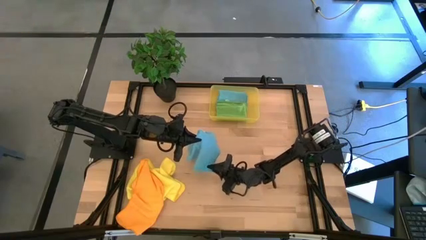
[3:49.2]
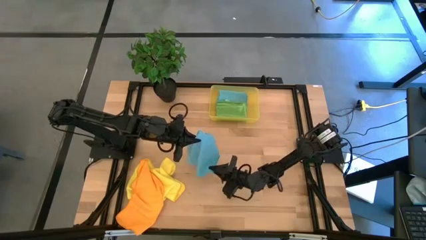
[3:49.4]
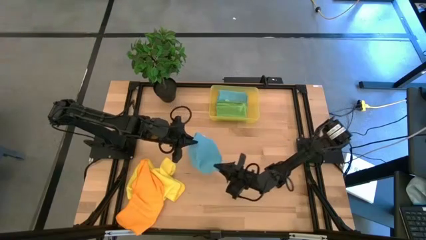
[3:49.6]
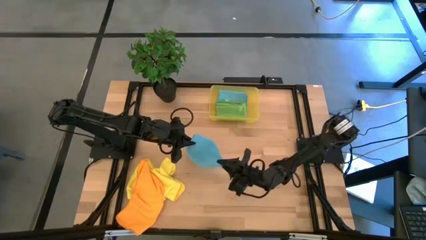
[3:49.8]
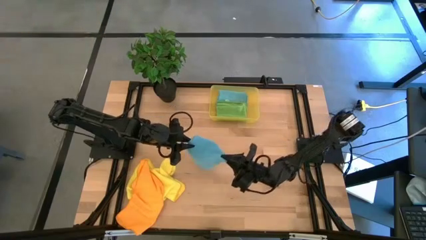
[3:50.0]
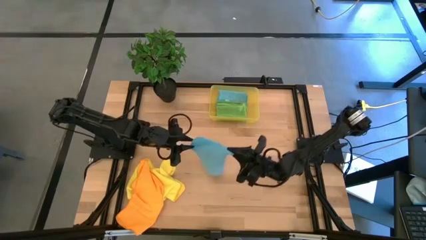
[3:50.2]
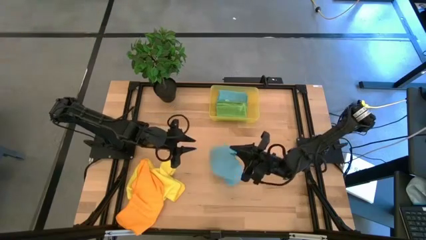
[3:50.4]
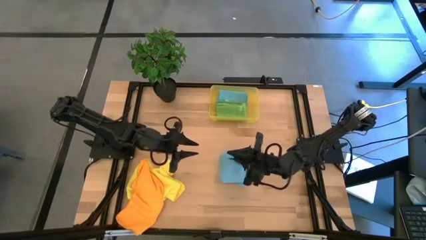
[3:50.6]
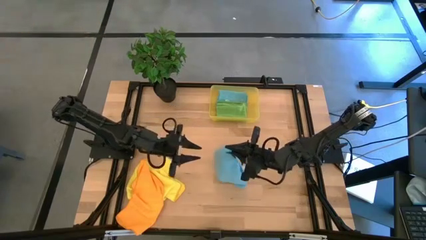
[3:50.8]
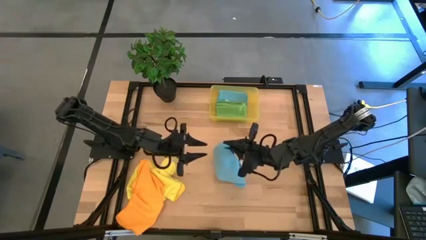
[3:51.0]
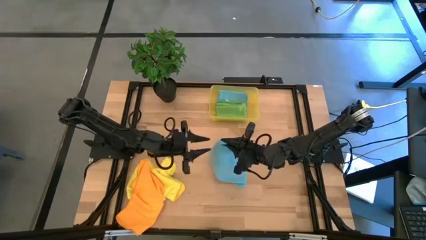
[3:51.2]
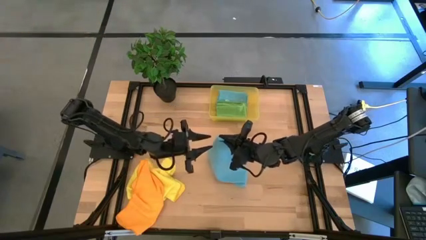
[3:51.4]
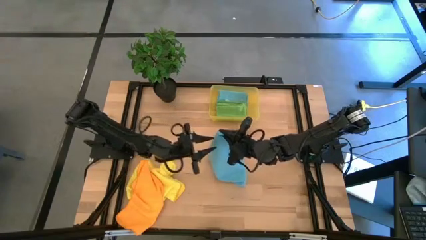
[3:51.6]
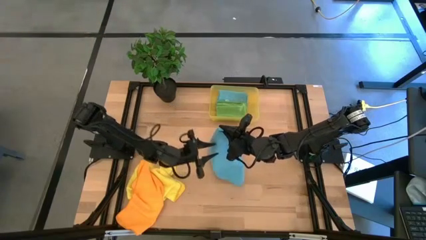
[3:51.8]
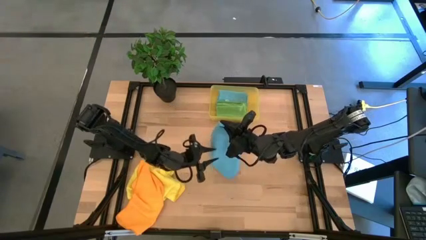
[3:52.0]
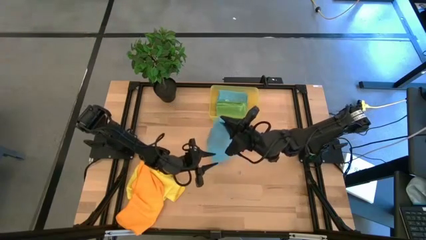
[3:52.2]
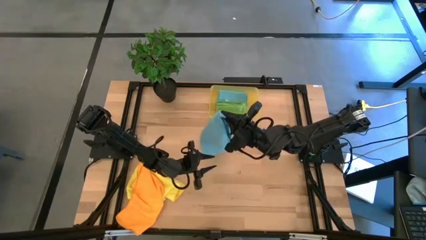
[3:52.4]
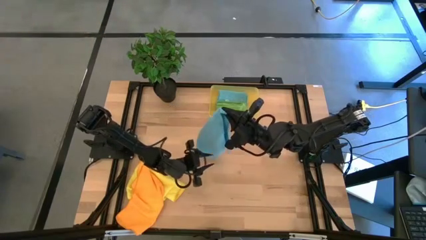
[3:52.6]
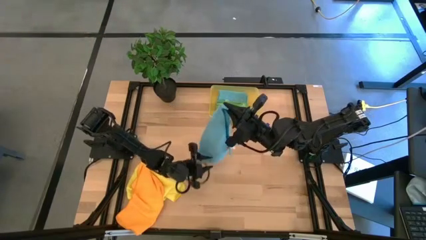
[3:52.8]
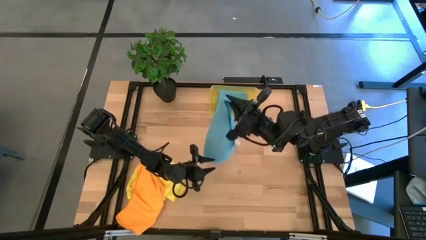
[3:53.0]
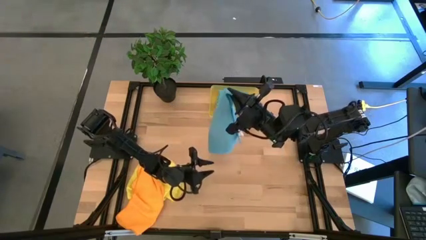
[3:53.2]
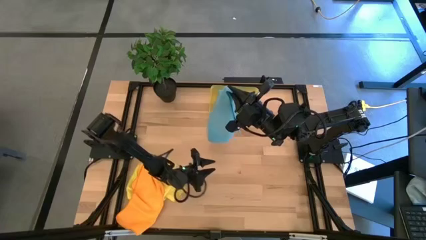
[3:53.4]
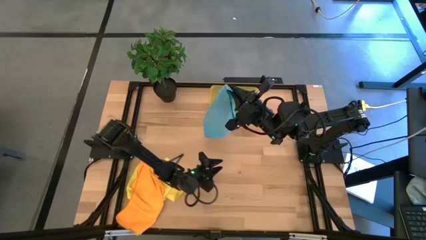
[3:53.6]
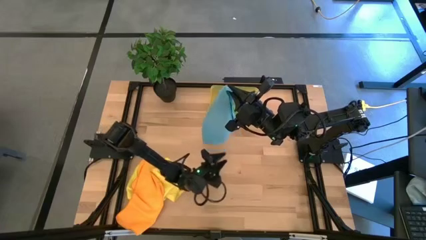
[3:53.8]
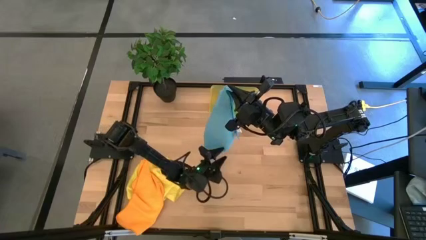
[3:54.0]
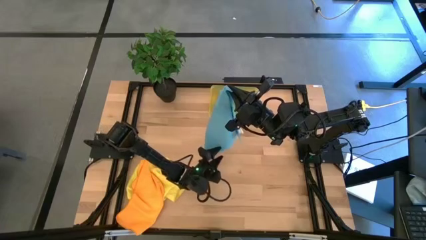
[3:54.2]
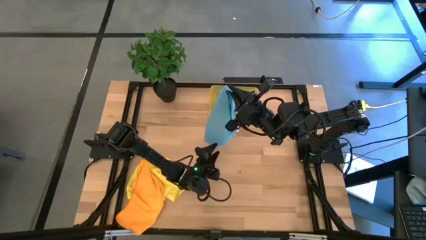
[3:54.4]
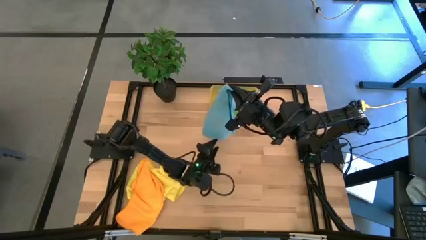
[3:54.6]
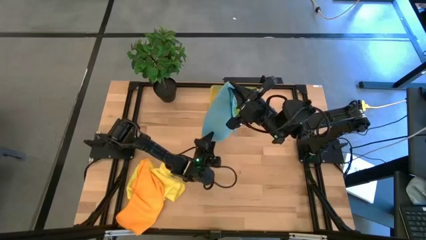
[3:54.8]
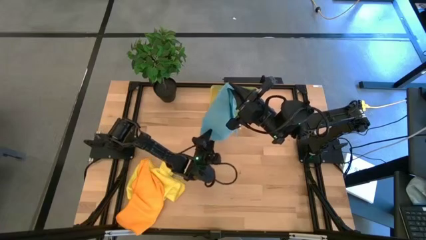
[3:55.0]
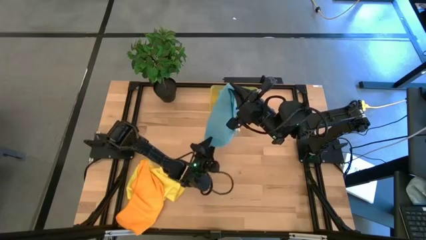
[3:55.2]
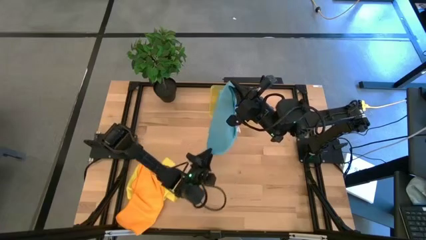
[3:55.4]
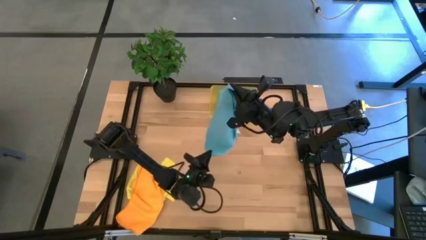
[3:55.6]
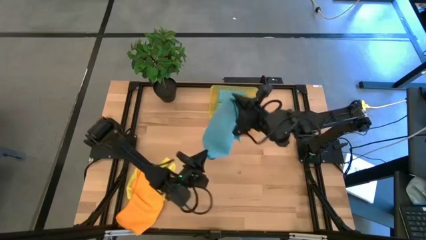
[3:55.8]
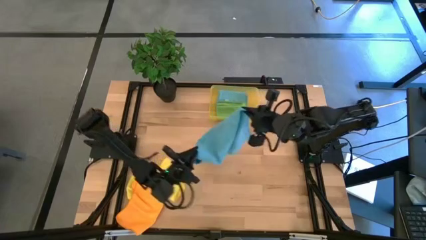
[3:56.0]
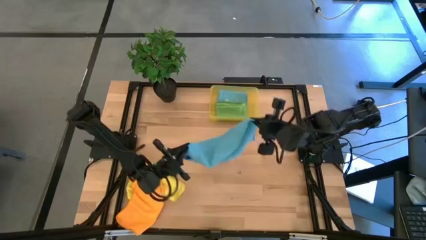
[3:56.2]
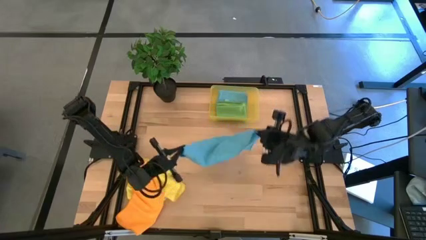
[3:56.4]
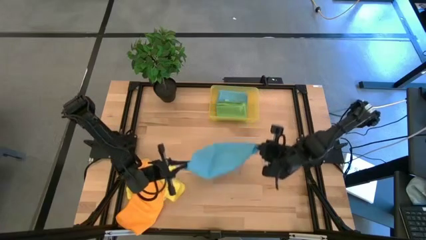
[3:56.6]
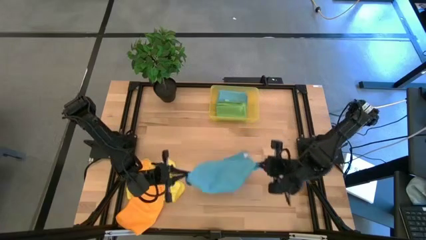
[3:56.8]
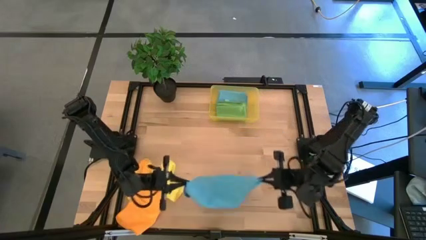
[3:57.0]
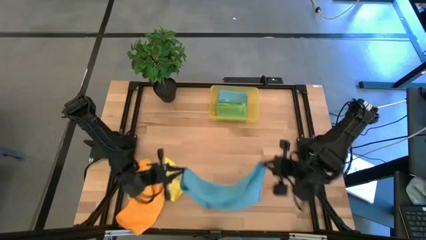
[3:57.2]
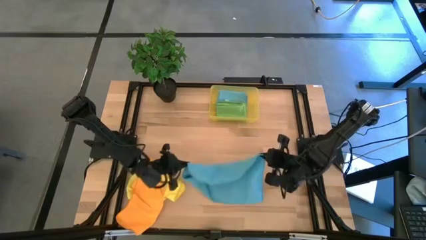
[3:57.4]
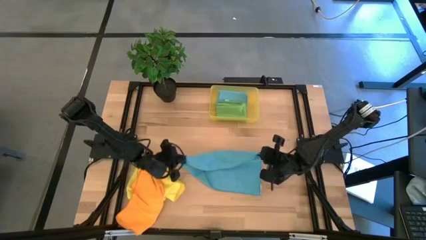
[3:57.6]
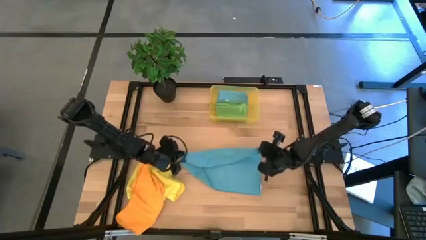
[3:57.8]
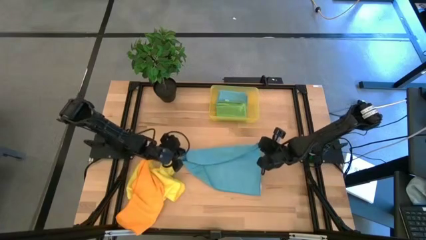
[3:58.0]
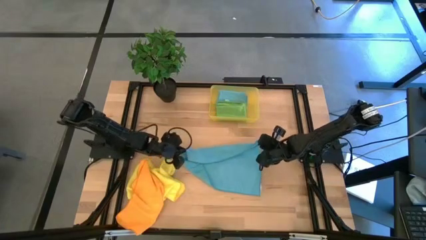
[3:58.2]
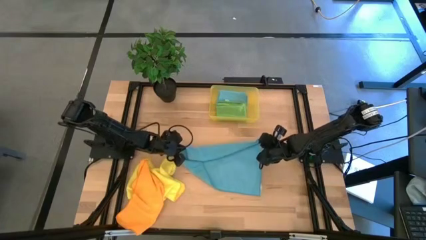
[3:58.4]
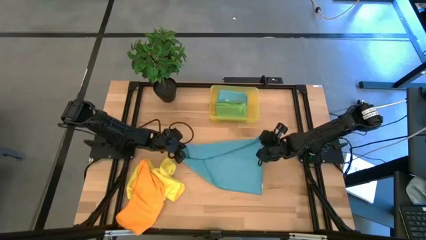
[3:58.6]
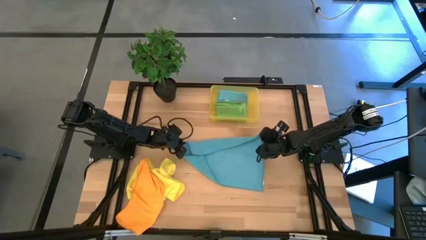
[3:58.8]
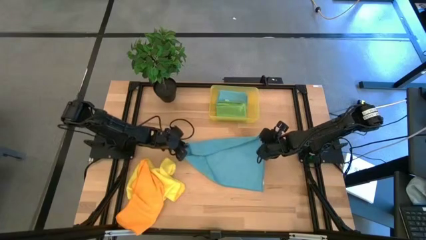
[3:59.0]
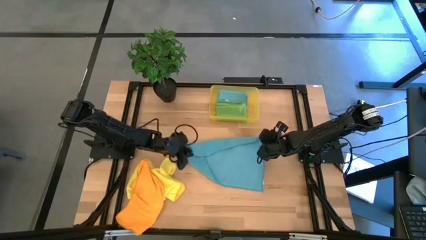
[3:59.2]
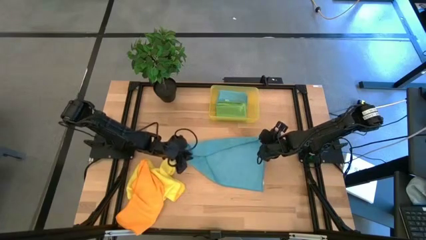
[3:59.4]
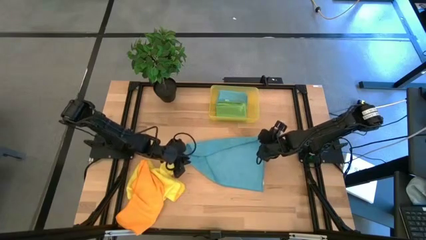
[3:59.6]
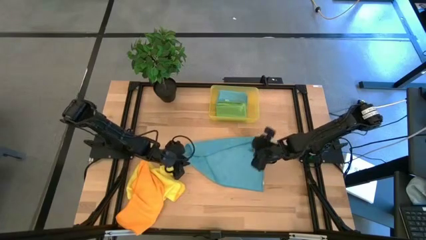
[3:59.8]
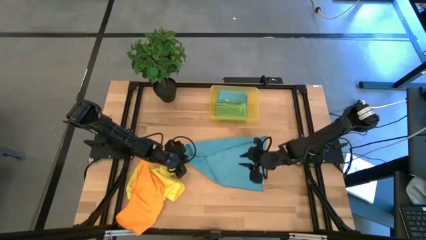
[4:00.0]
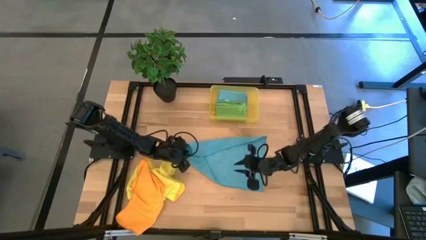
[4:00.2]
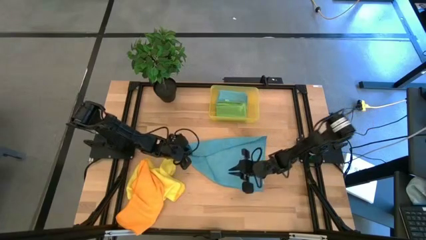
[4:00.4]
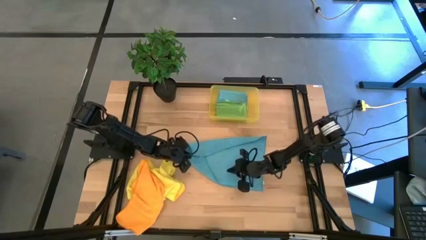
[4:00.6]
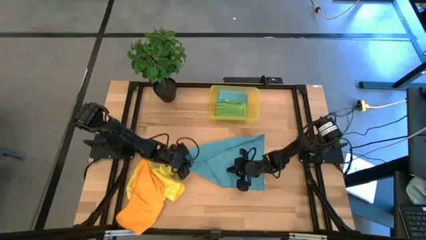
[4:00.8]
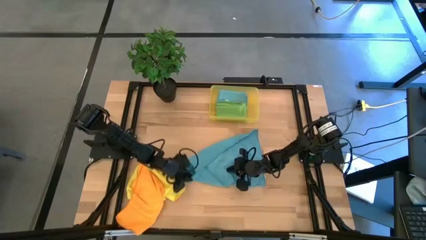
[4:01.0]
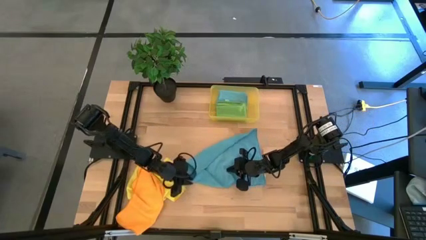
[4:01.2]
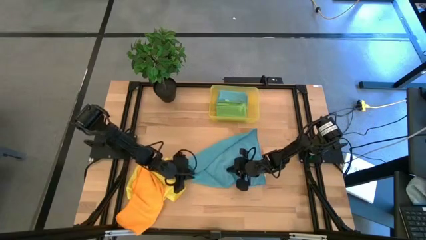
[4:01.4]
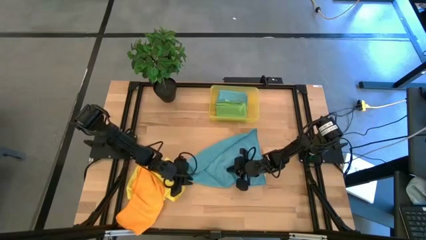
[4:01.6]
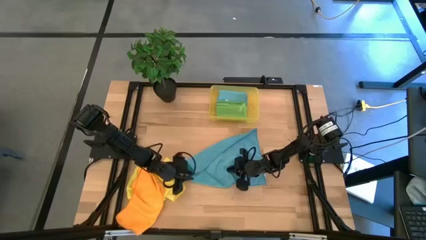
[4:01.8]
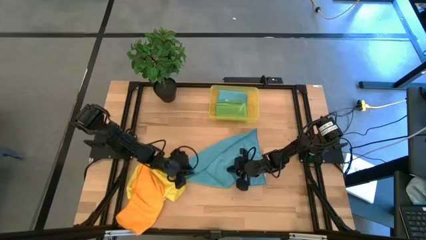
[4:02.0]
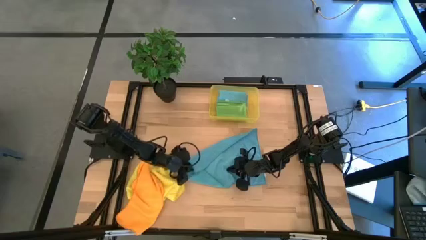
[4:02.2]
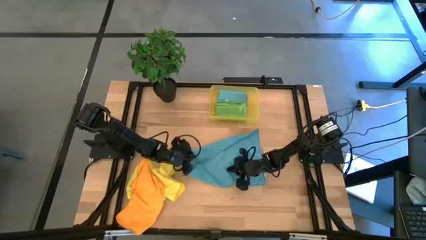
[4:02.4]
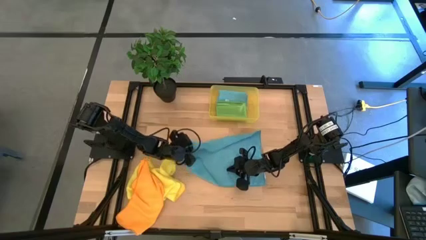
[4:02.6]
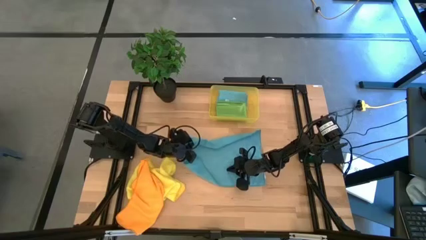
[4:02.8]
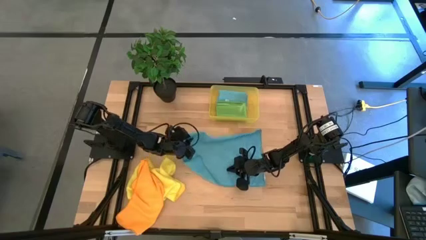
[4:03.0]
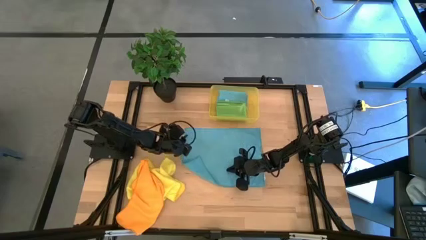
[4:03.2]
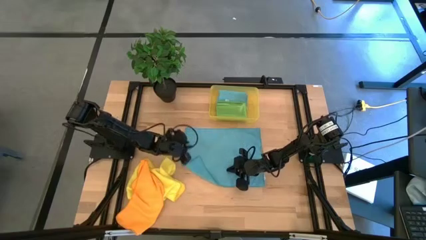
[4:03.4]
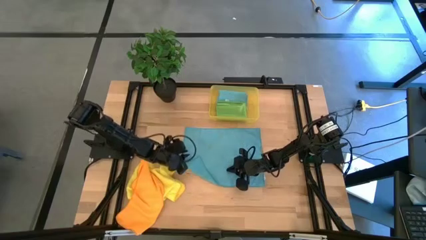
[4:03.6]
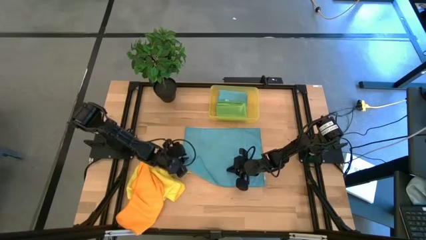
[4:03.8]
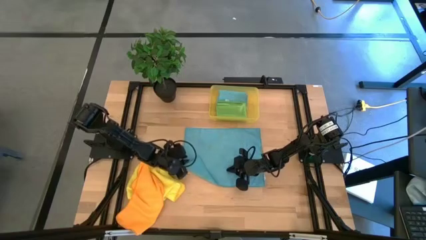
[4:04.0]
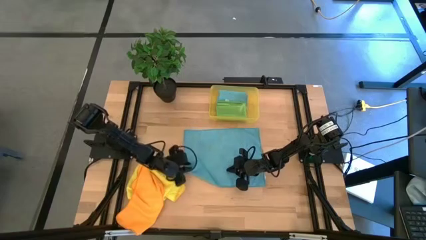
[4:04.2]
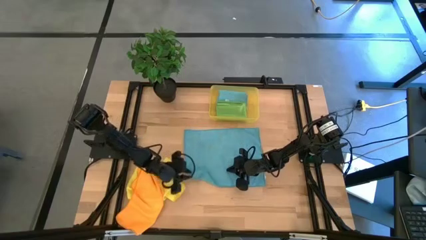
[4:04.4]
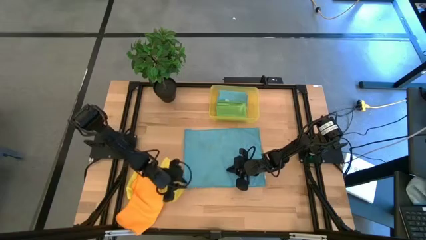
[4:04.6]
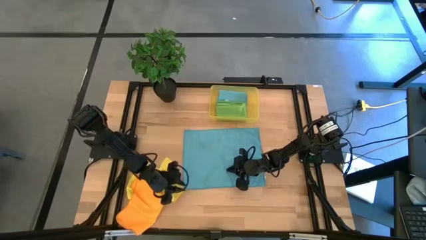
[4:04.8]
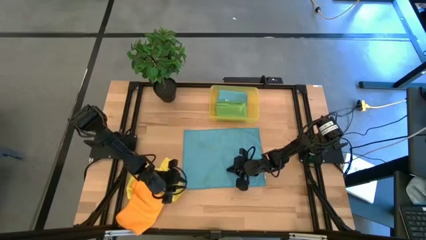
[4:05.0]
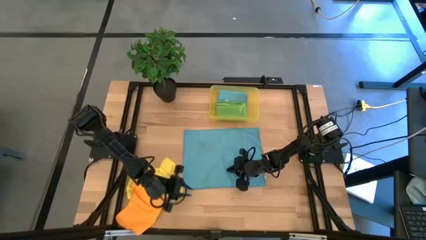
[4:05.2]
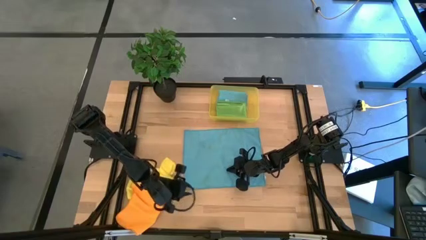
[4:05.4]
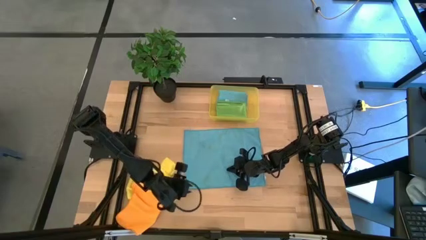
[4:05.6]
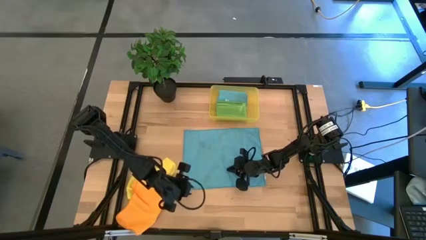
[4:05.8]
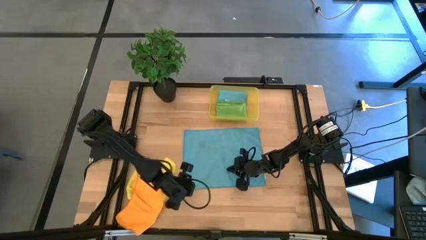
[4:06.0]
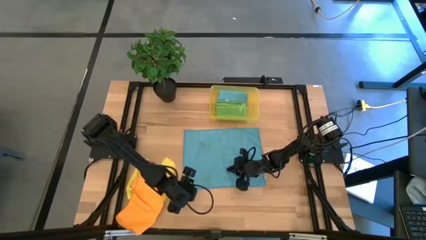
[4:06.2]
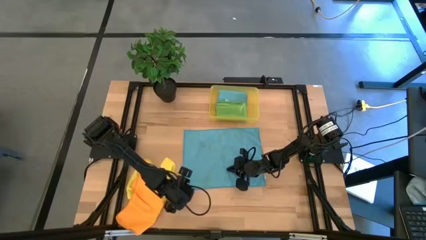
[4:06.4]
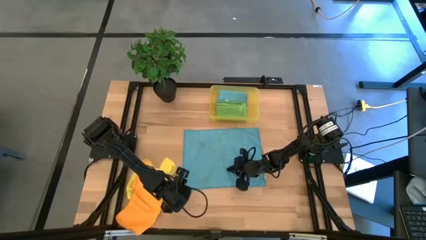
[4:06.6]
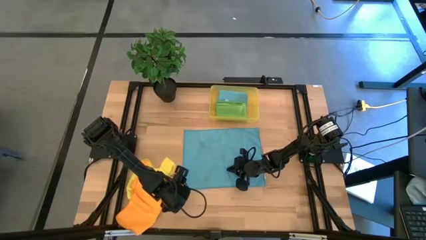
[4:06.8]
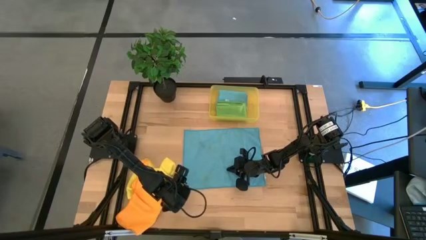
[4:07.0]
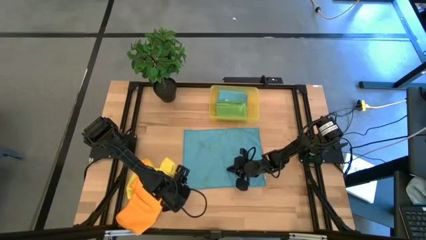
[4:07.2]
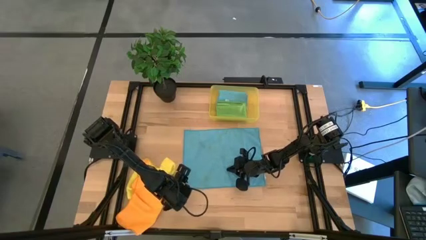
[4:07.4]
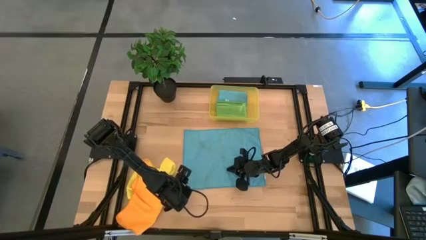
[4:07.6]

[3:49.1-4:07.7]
Task: Fold microfiber towels
Fold the blue microfiber towel
